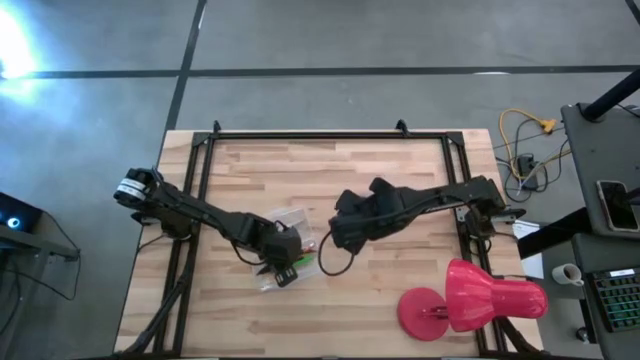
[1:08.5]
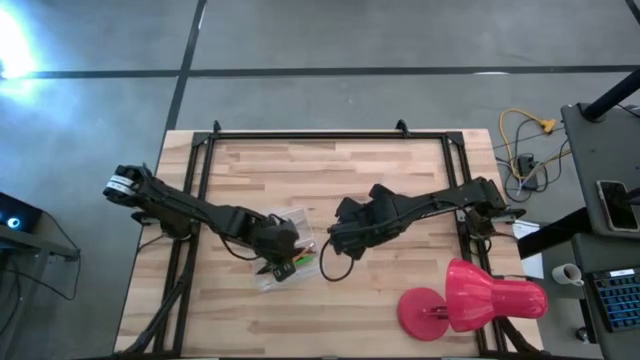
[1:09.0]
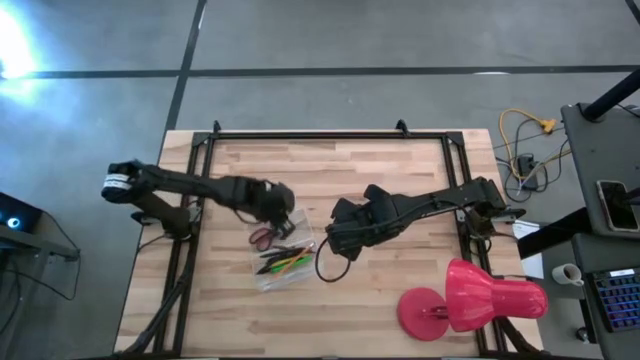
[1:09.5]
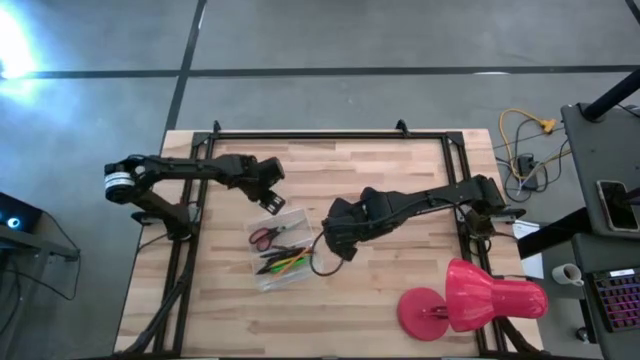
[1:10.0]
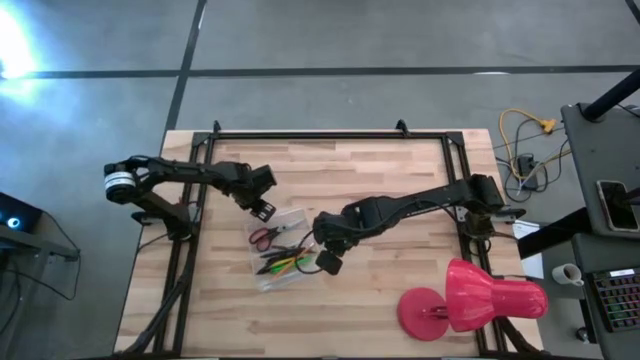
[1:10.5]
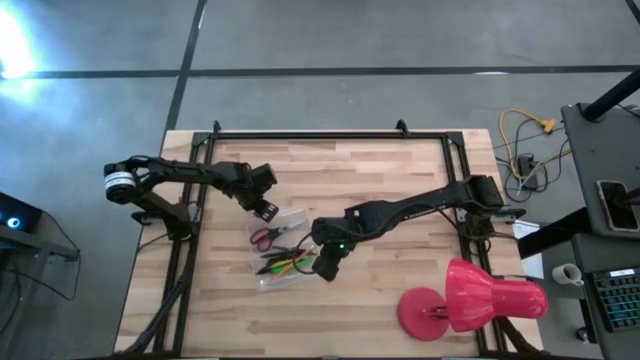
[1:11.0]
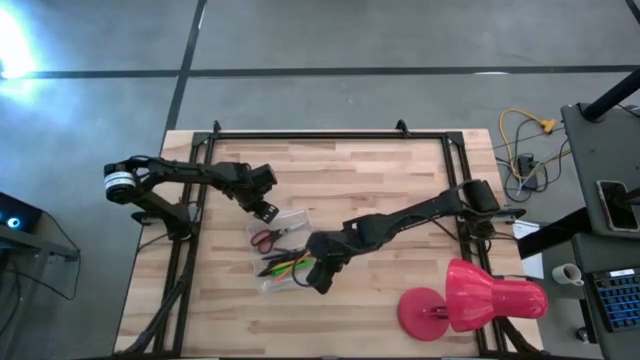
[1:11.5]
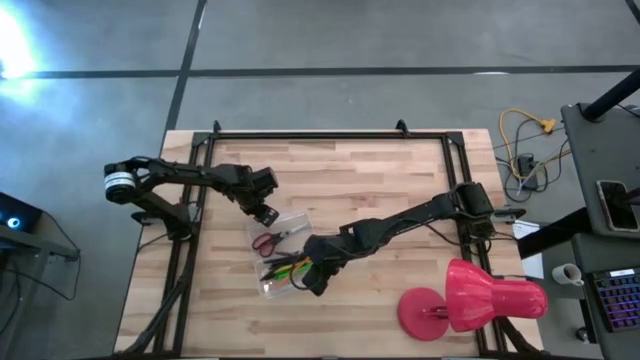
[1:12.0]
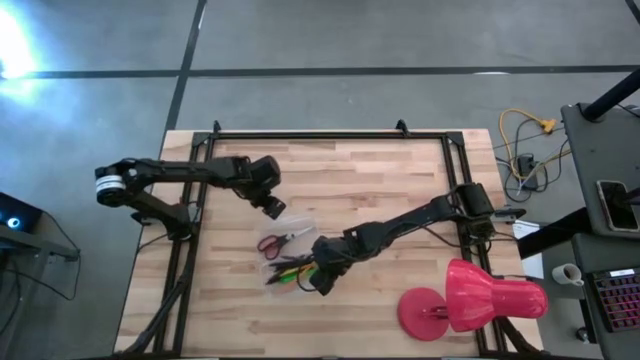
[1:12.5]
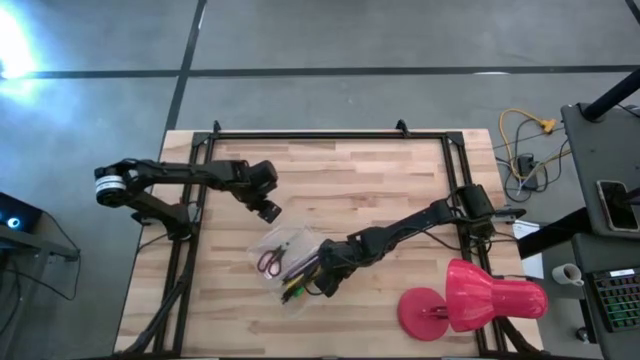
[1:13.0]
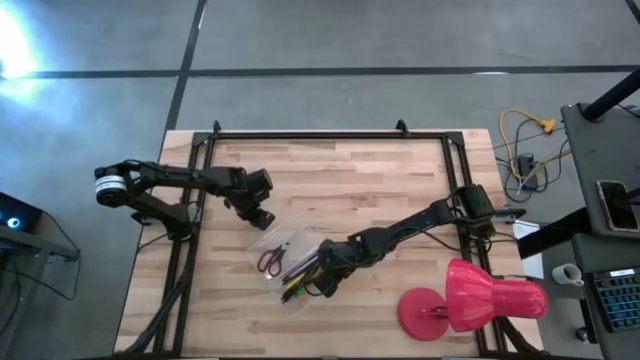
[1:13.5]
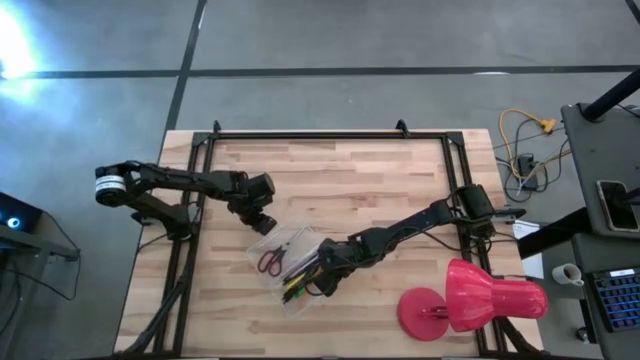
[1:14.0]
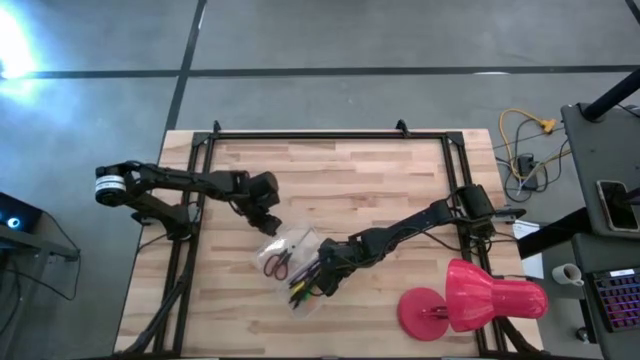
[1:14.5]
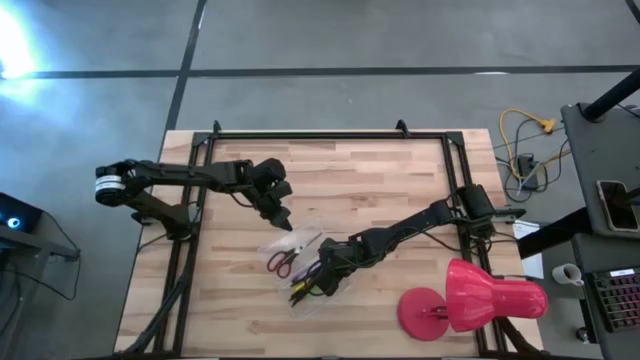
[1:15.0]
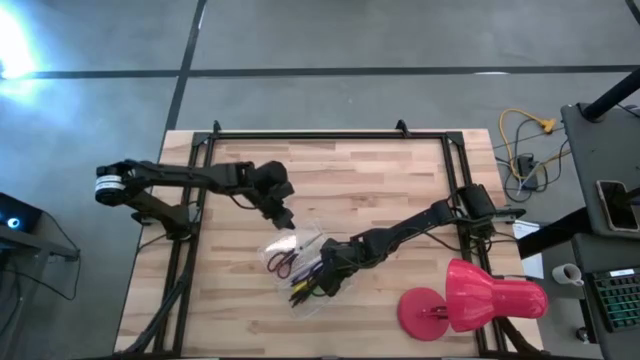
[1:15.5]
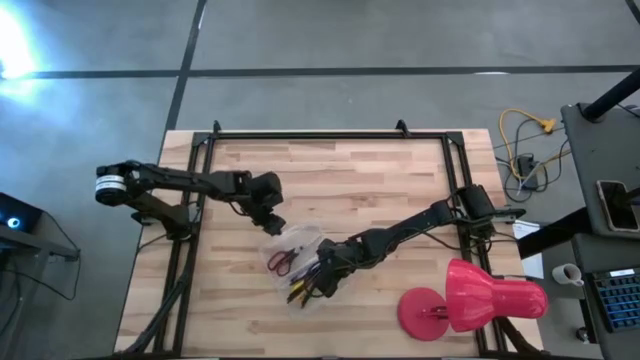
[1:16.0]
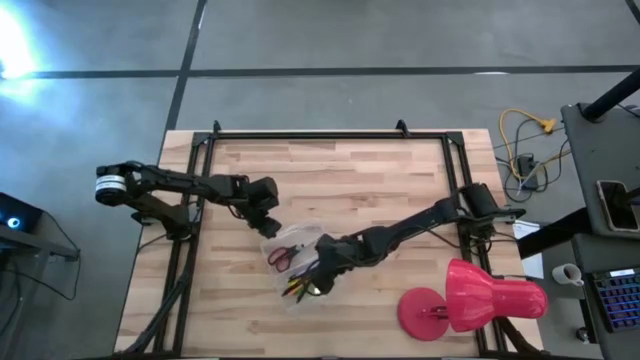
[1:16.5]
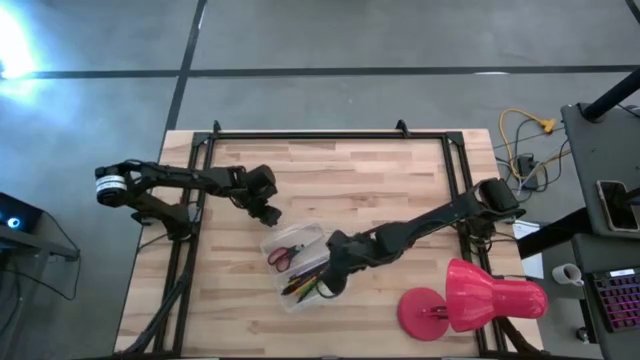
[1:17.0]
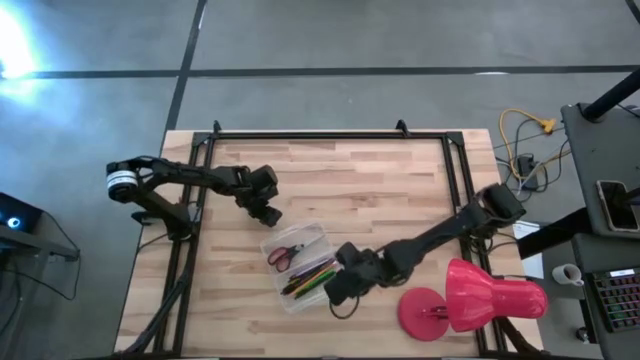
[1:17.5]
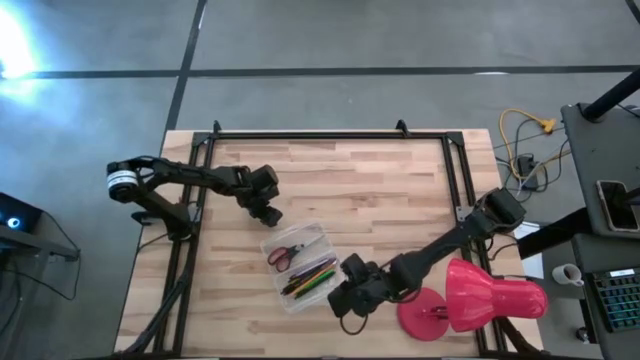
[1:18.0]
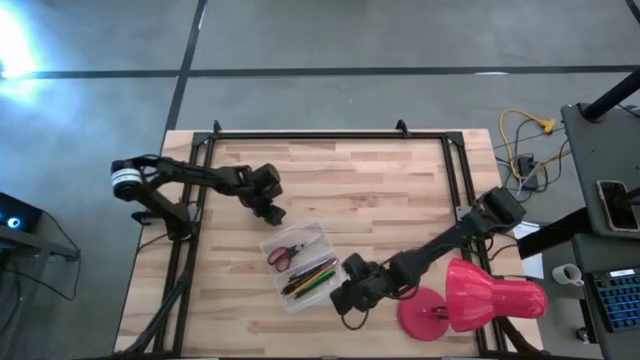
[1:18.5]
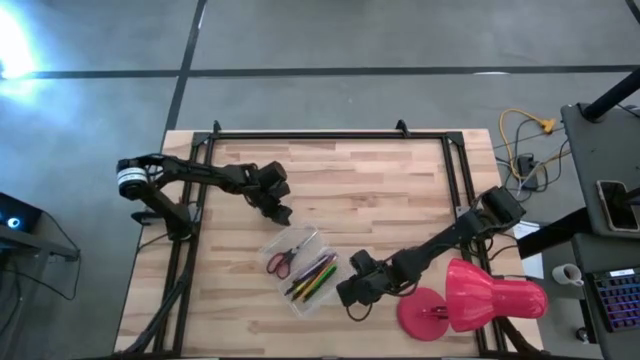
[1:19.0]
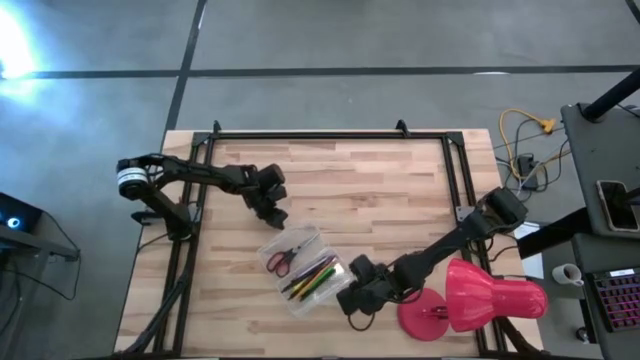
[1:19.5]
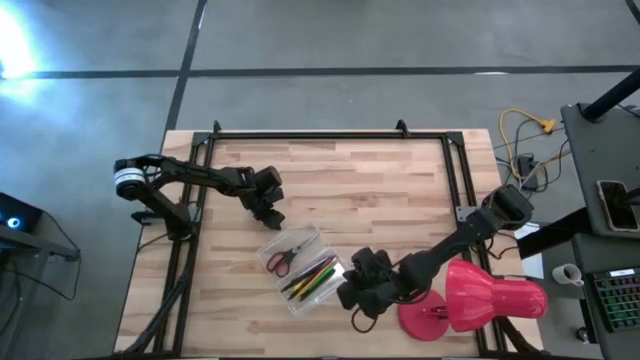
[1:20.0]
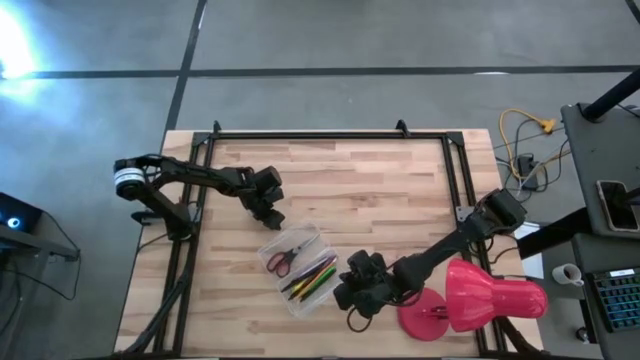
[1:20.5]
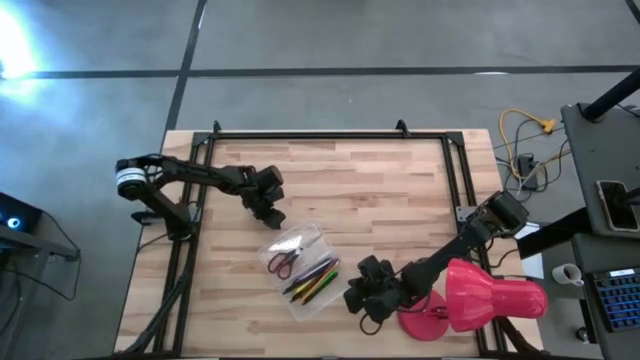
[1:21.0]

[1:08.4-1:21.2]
Task: Pick & place school supplies into a supply box
Close the stationery box

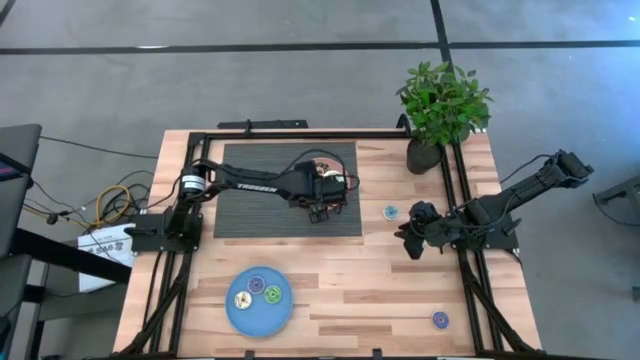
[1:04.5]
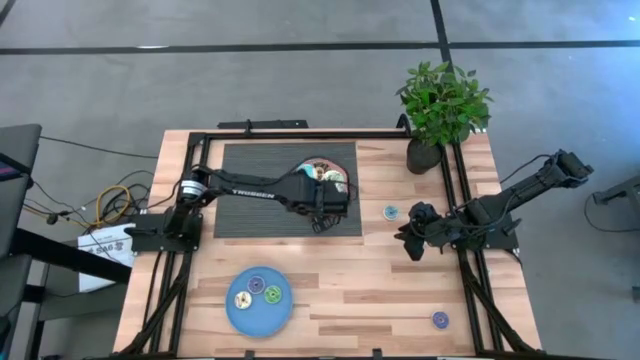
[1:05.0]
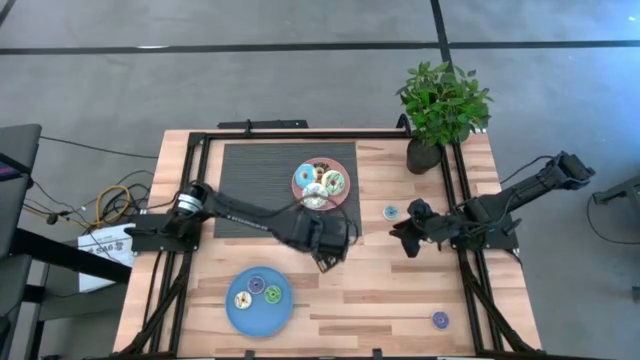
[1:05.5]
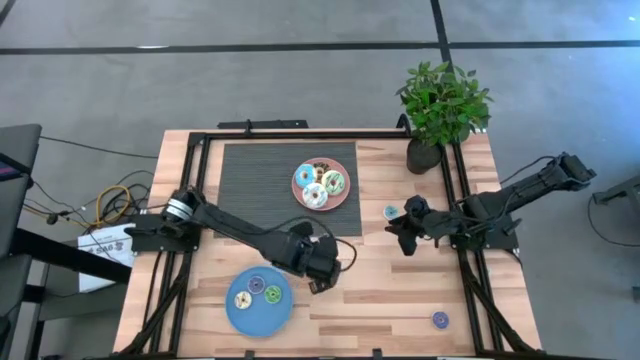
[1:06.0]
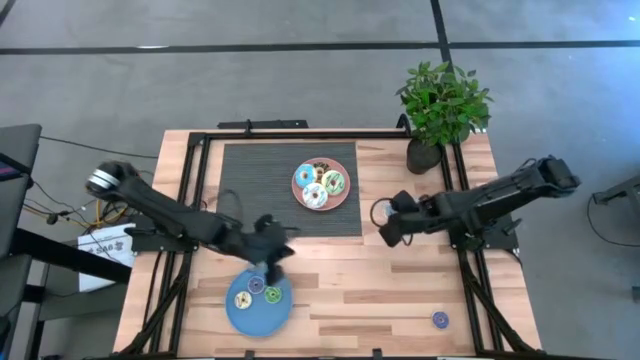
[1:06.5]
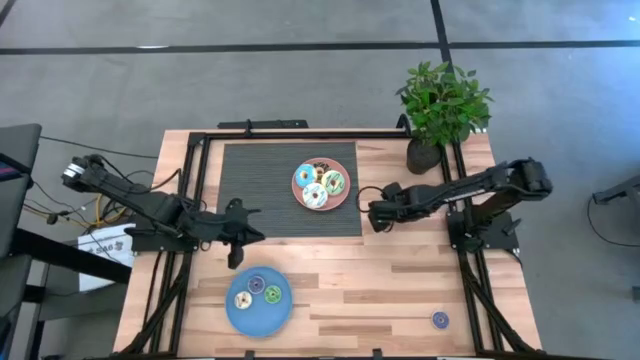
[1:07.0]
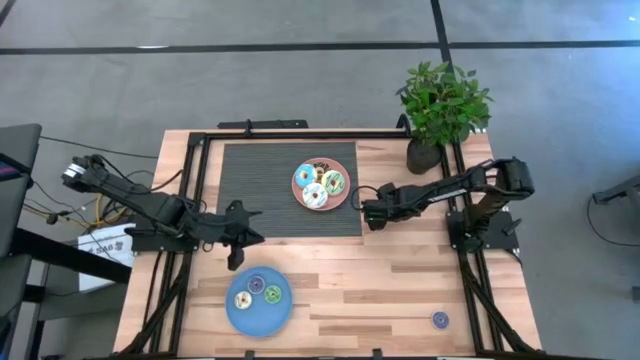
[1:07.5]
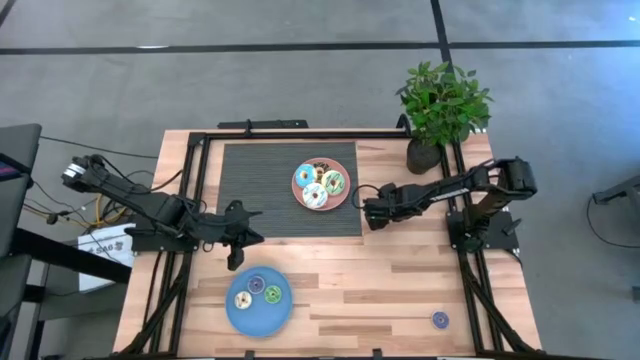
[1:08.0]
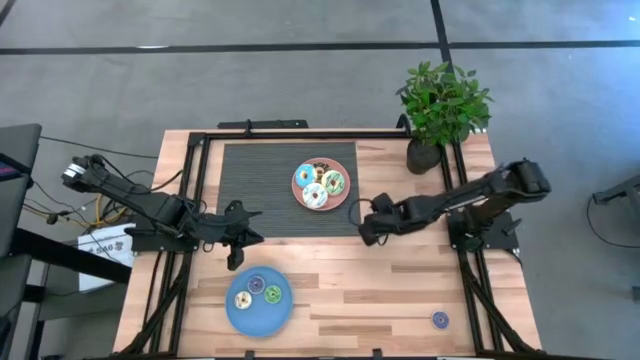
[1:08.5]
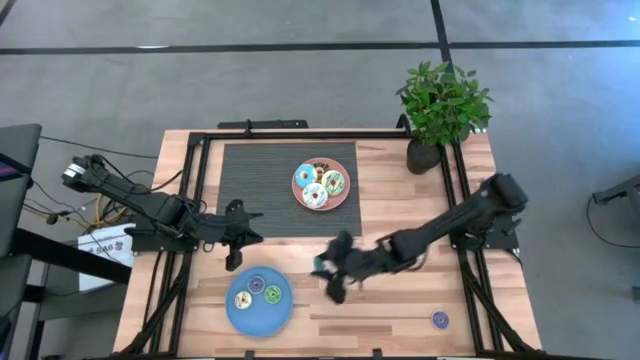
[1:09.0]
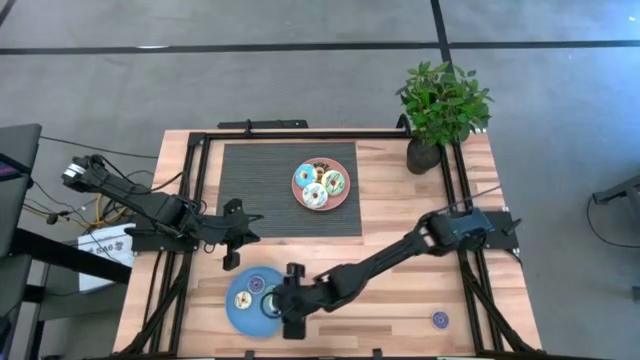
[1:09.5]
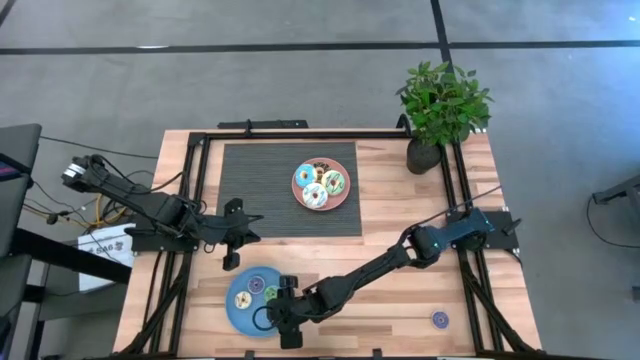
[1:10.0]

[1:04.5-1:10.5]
Task: Pick & Place donuts
Put the small blue donut on the blue plate
